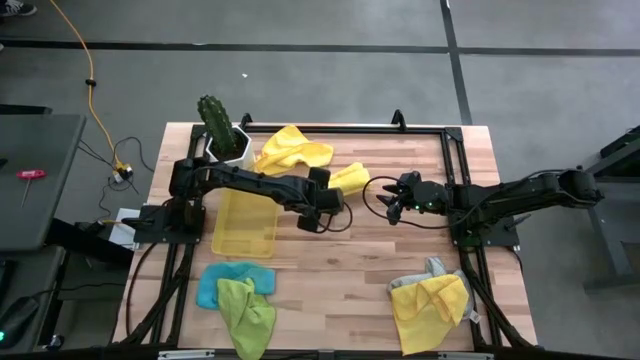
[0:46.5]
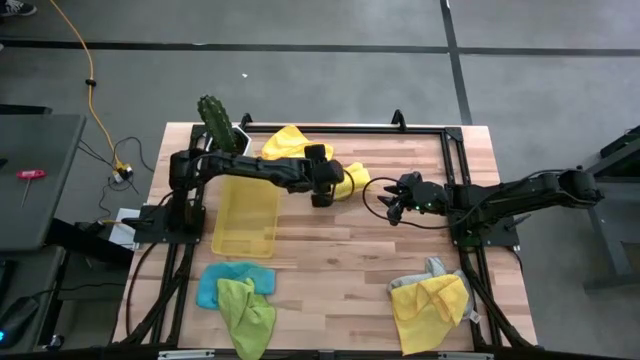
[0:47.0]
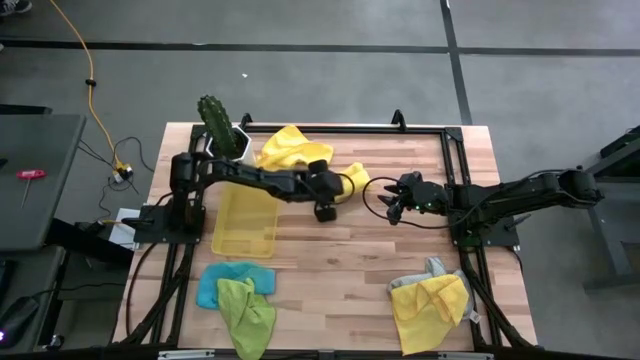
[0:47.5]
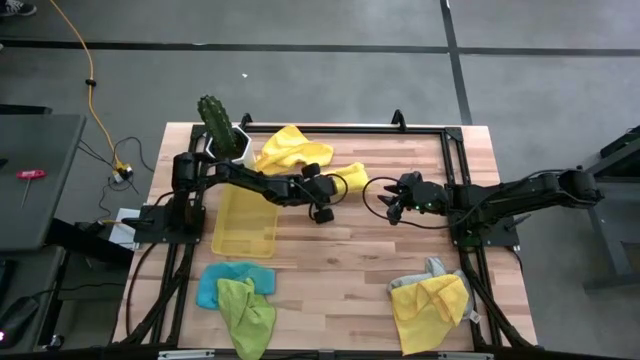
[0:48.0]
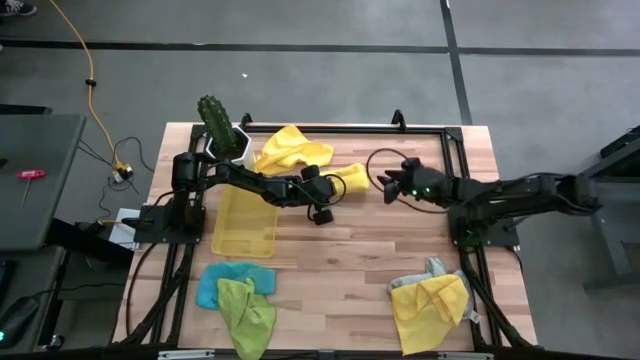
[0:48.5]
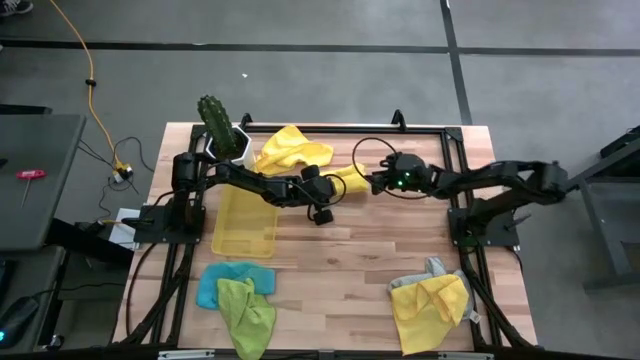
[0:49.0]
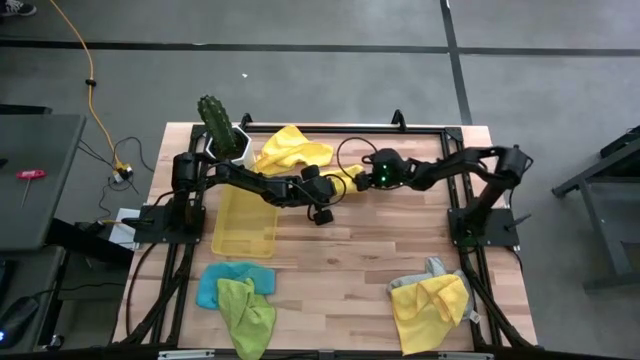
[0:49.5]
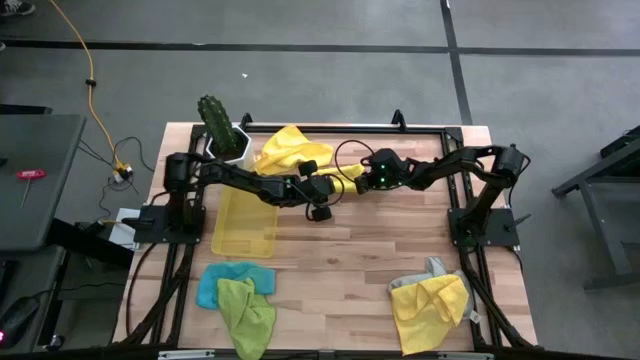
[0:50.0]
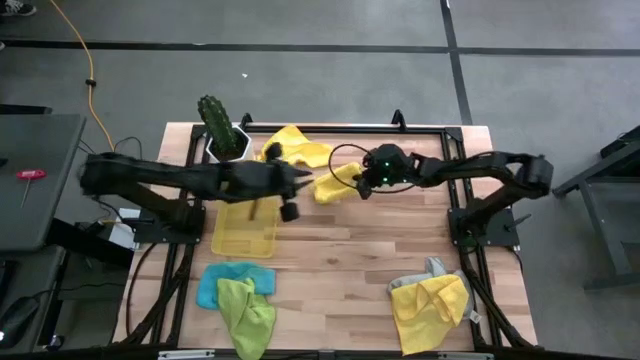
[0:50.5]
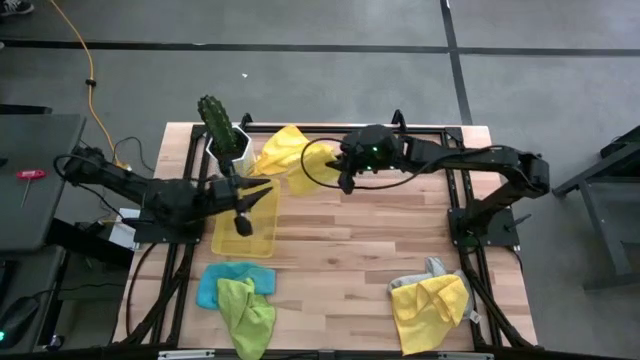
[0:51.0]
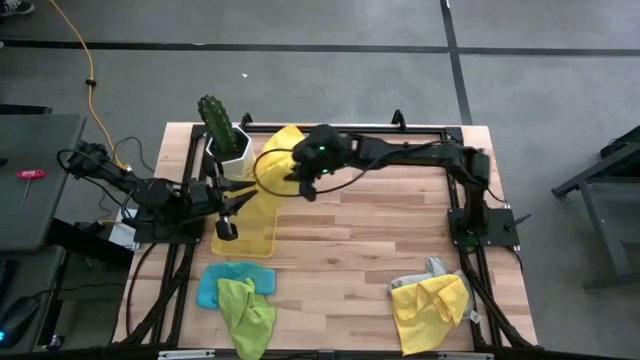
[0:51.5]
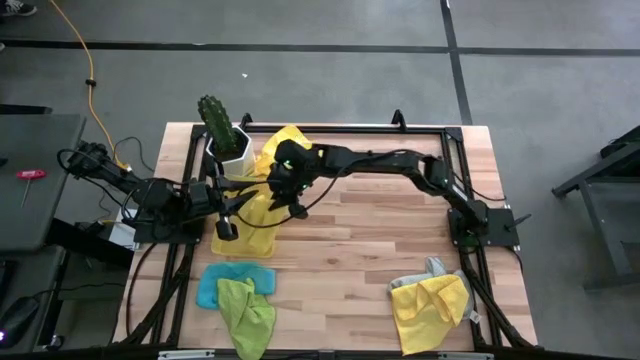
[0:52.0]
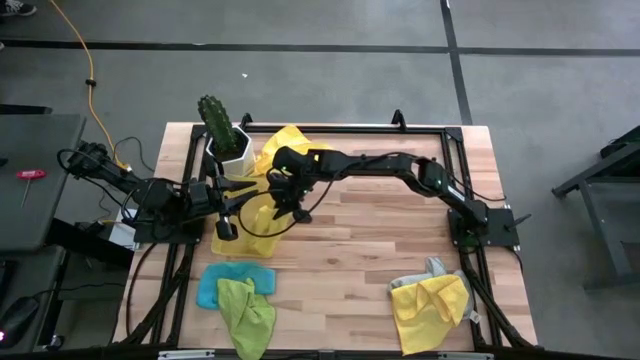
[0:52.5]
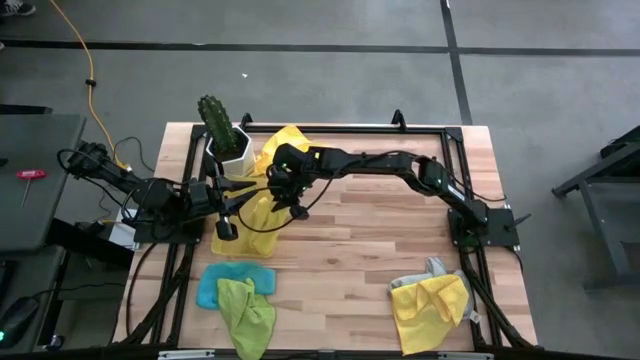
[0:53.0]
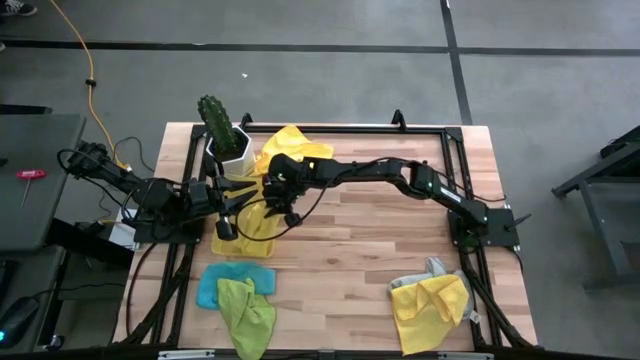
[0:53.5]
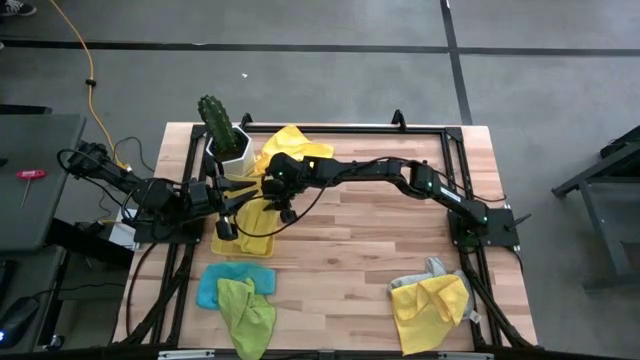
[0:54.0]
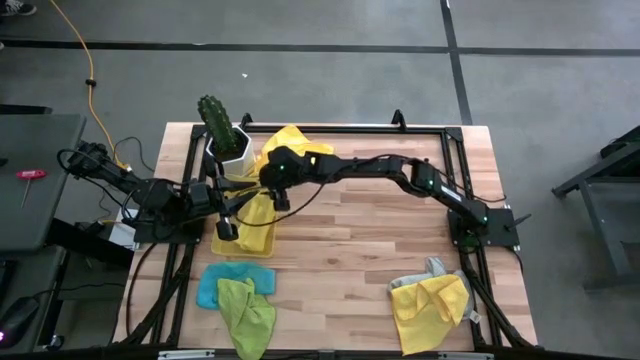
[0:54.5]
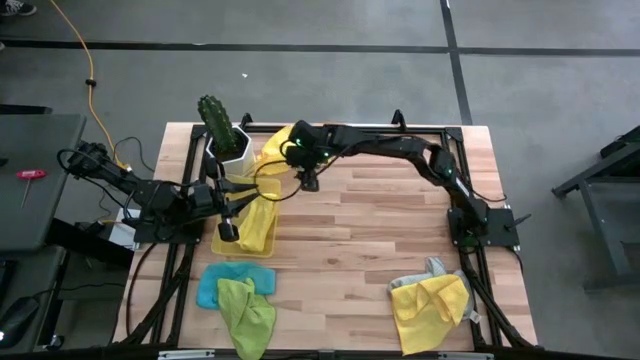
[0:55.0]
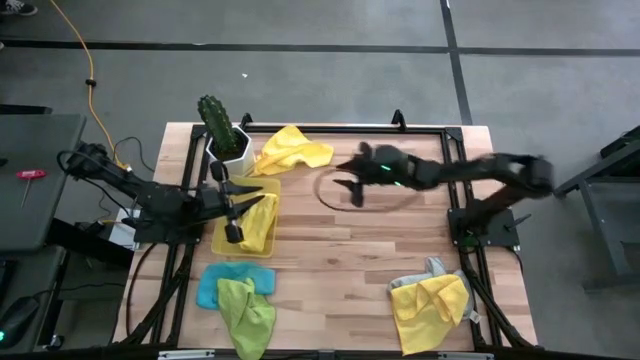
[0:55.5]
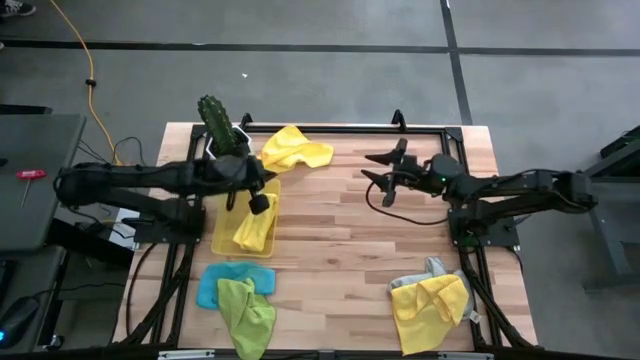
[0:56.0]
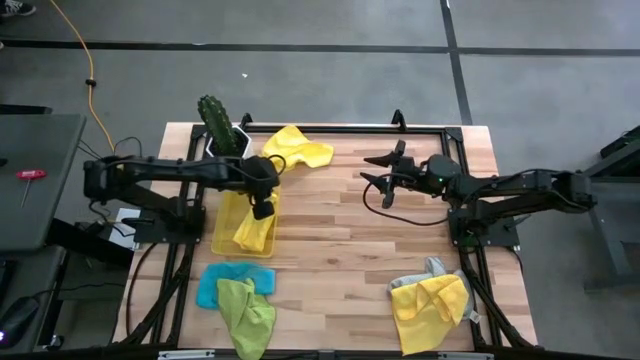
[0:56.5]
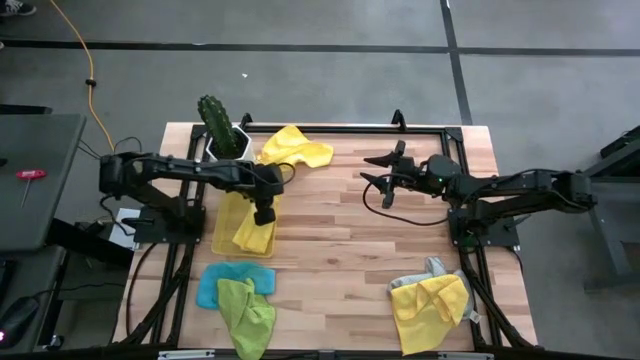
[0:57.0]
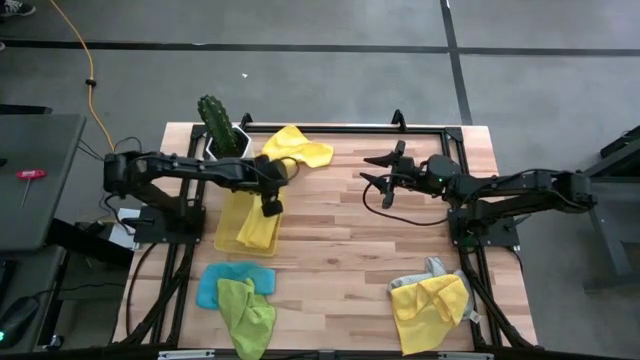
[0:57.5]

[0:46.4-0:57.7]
Task: Fold microfiber towels
Put the folded yellow microfiber towel into the yellow bin

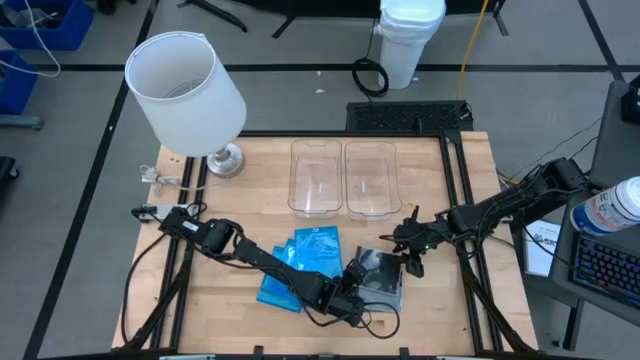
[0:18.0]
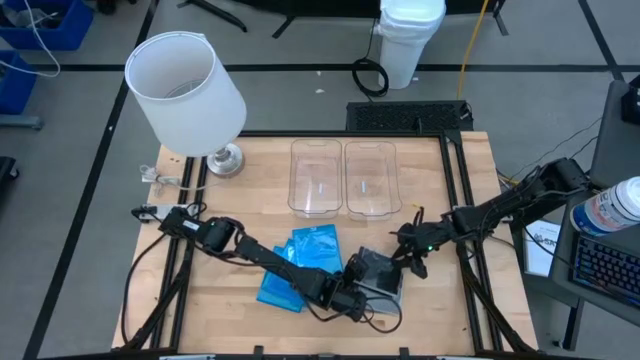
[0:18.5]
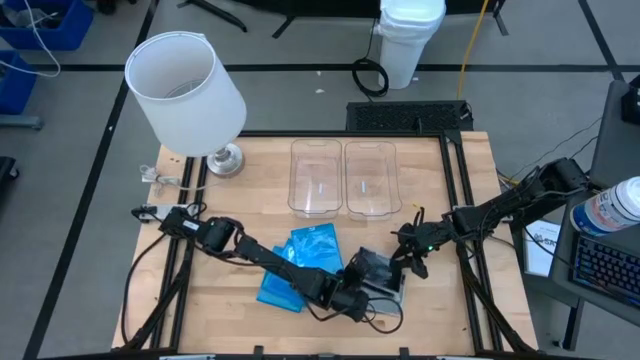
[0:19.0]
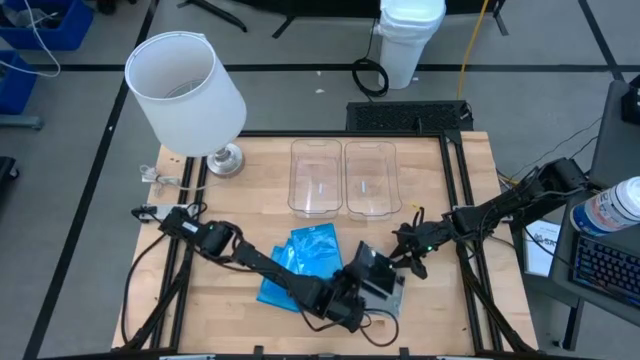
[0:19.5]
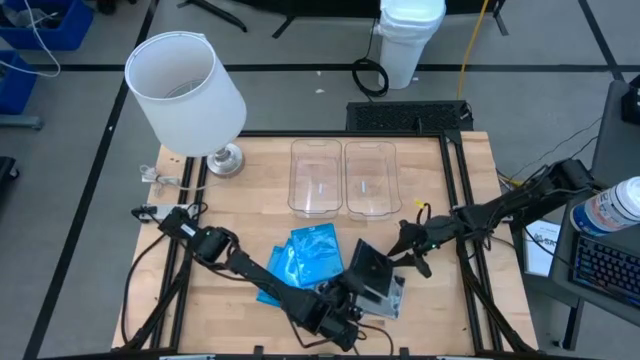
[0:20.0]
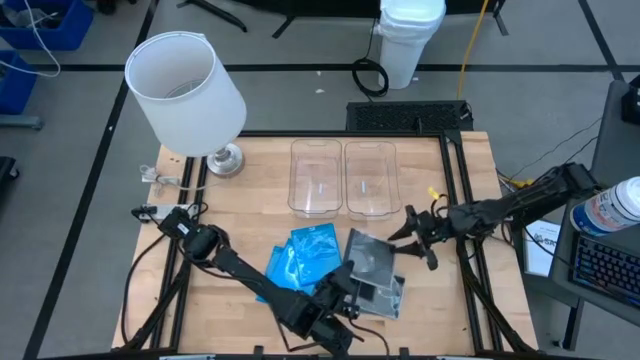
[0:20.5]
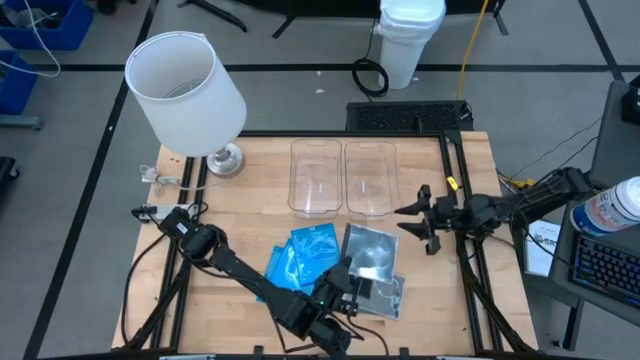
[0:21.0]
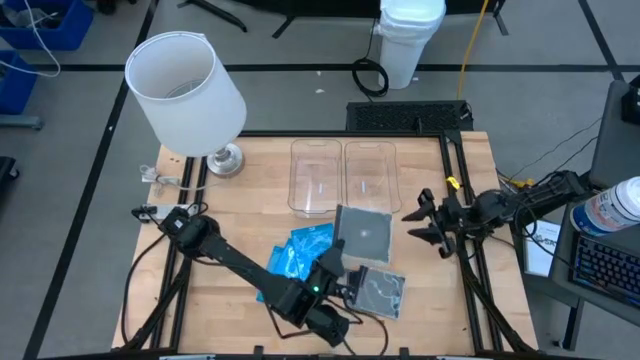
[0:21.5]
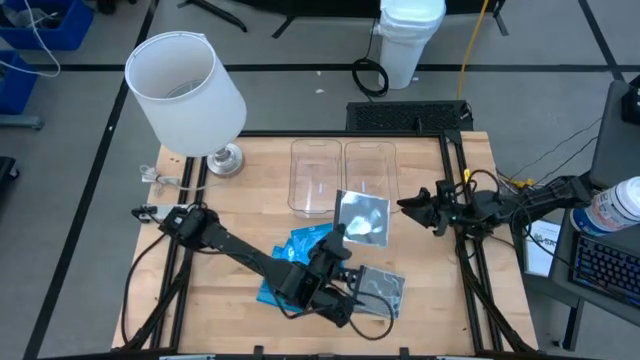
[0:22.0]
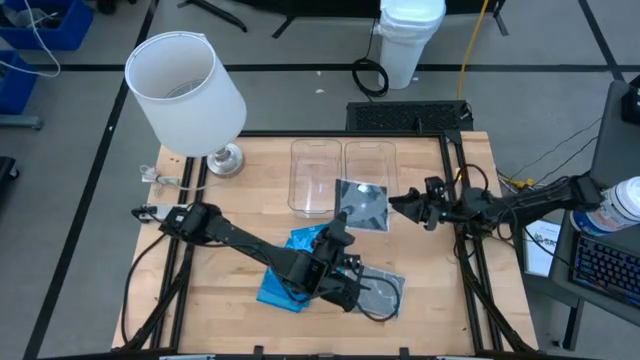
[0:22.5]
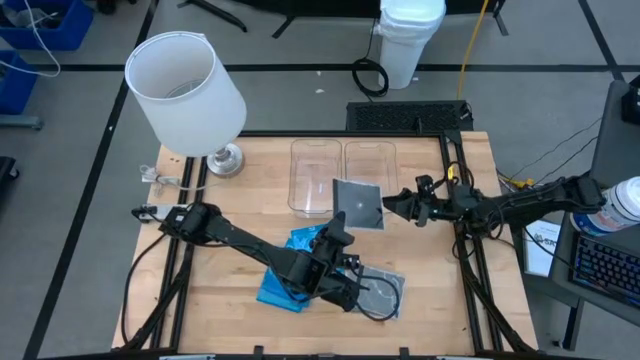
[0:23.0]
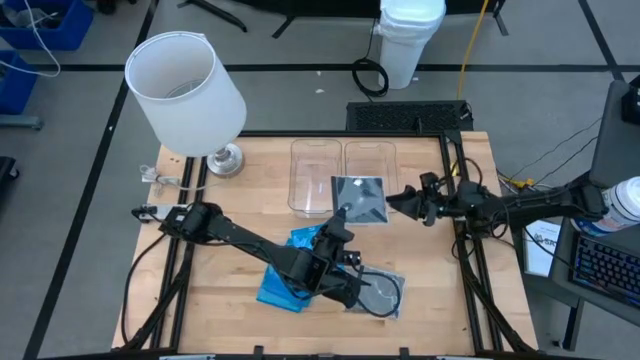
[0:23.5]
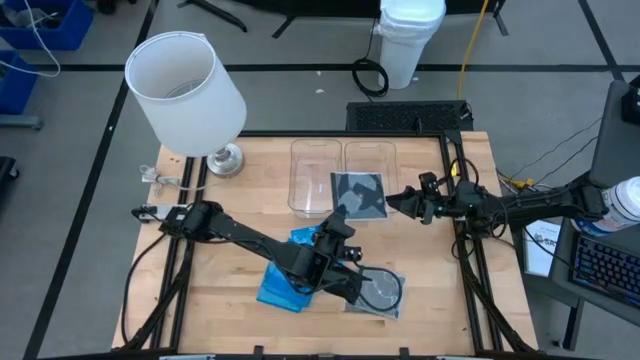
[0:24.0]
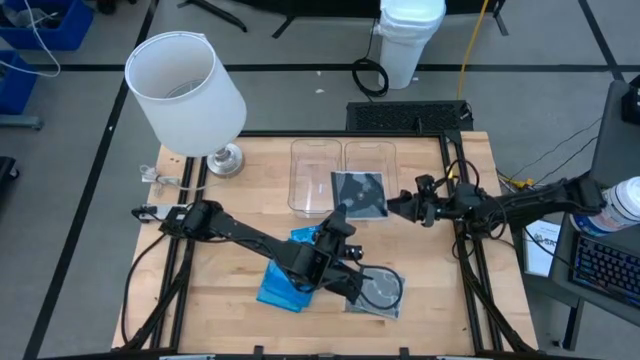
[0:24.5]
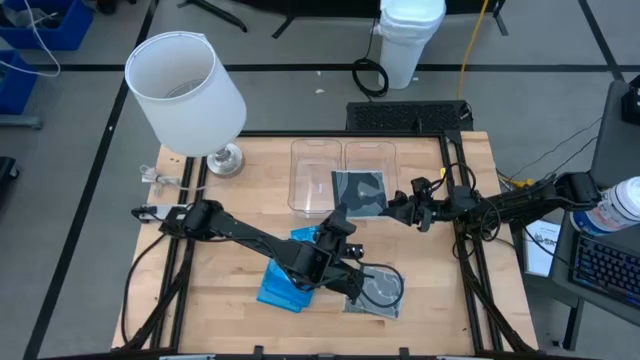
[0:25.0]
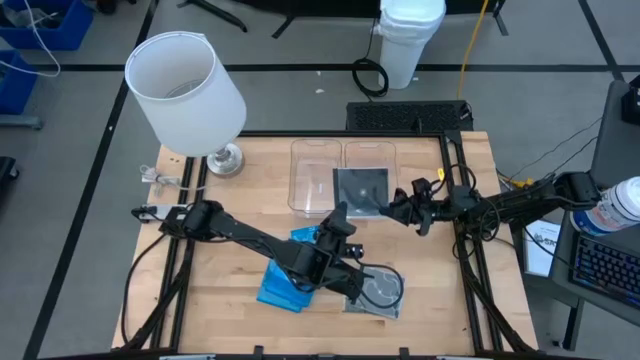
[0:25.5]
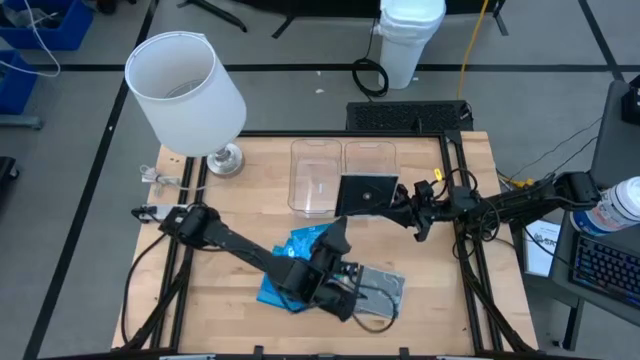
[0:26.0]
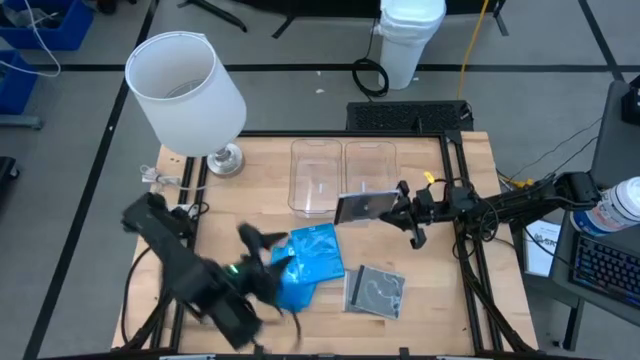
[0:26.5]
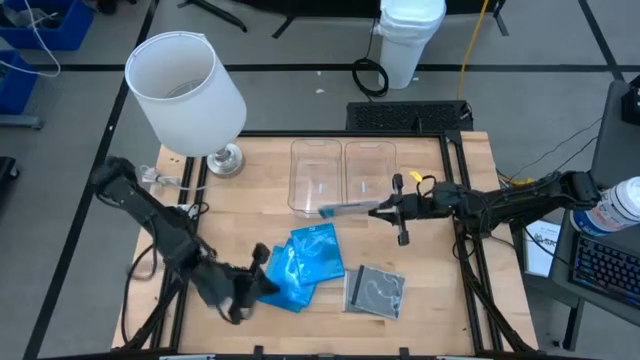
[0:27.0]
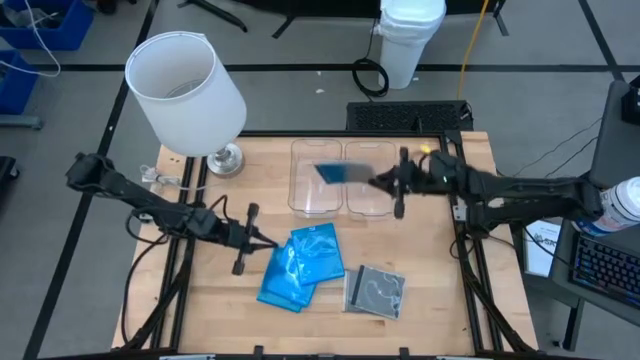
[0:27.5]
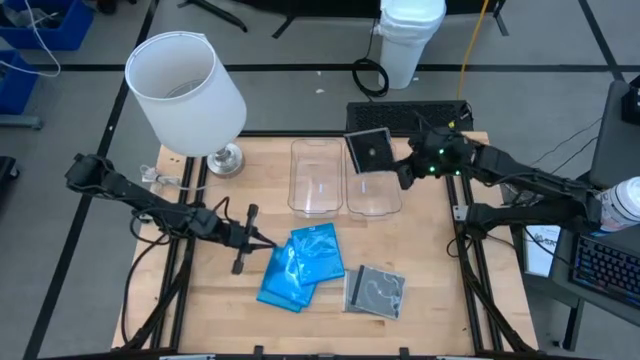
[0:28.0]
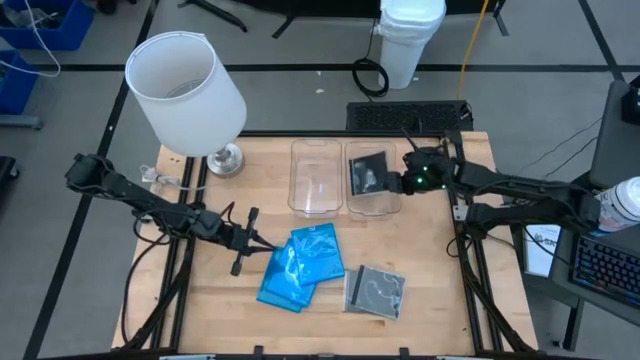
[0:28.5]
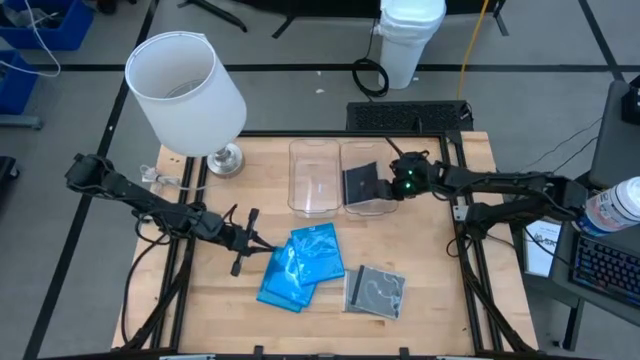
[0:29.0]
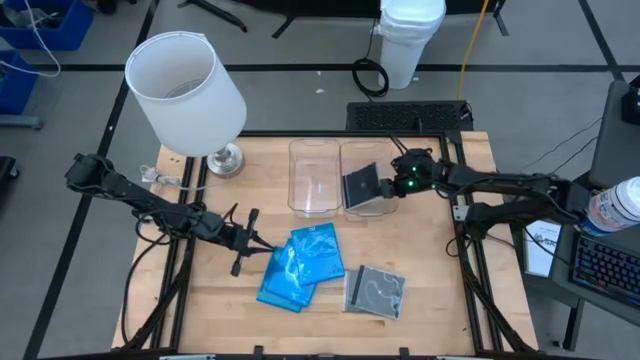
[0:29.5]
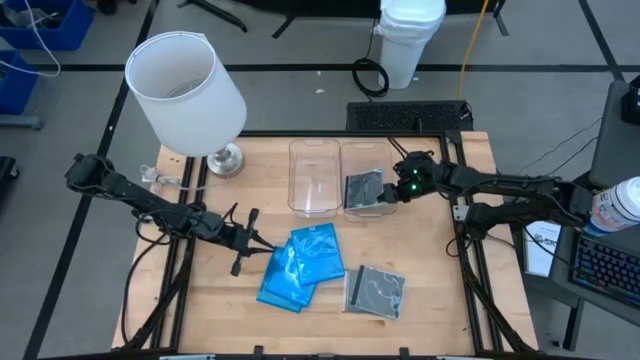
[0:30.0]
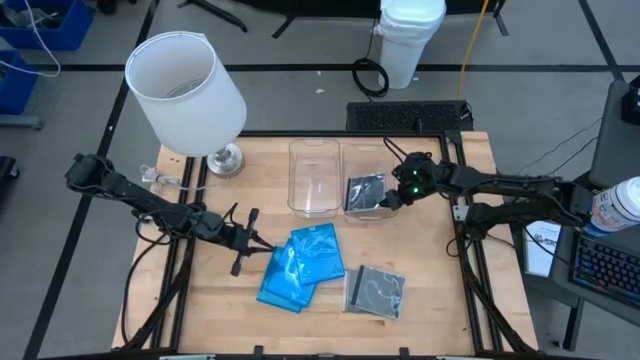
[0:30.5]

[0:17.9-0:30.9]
Task: Pick & place jewel cases by type
Put the top black CD case into the right transparent bin
